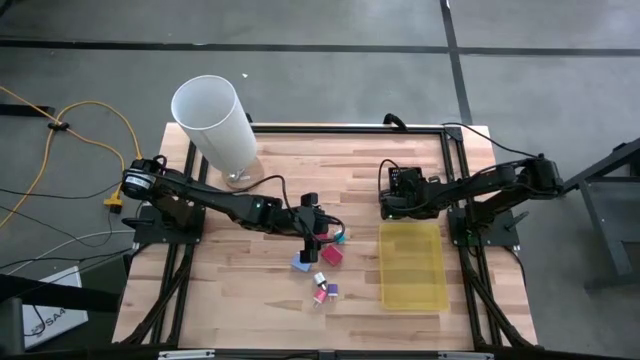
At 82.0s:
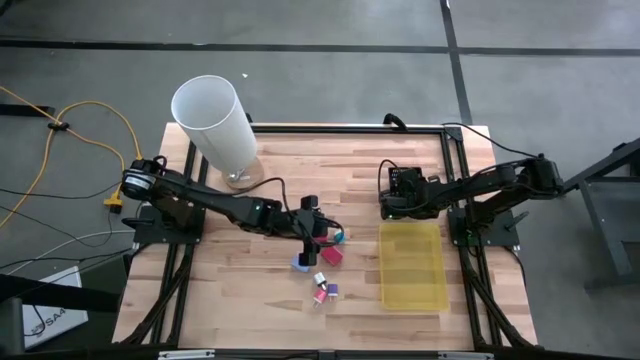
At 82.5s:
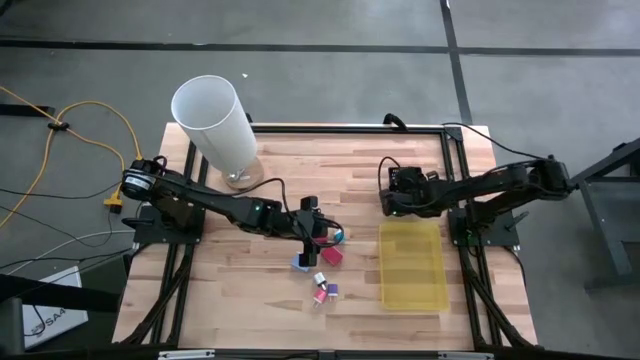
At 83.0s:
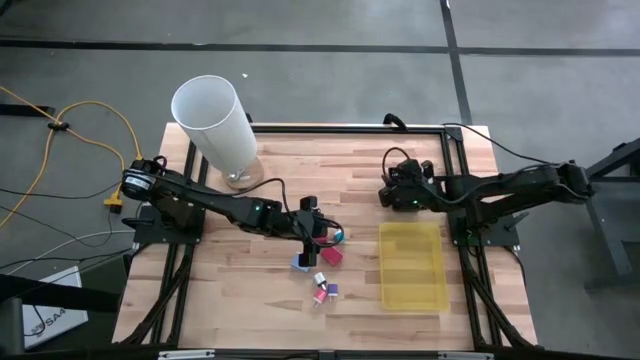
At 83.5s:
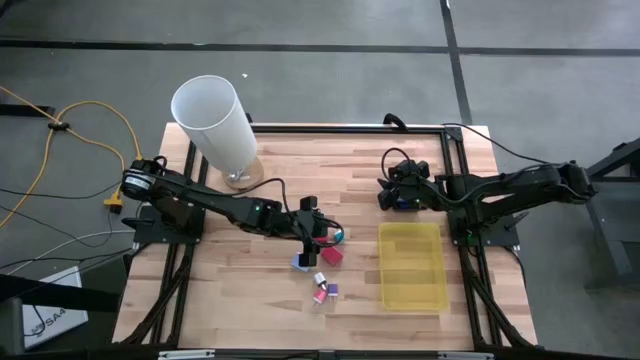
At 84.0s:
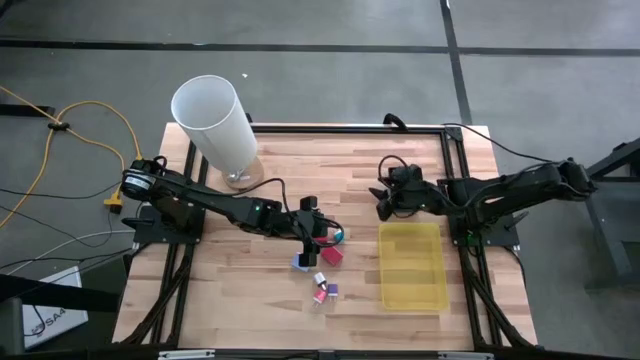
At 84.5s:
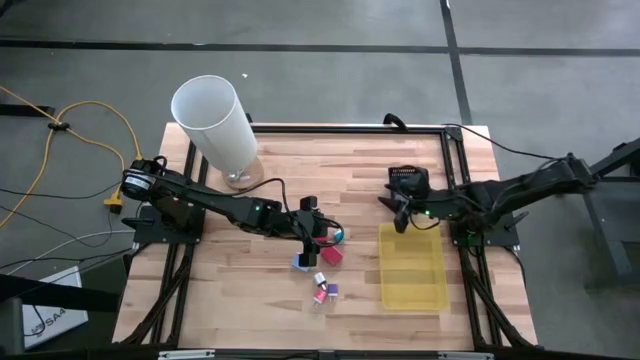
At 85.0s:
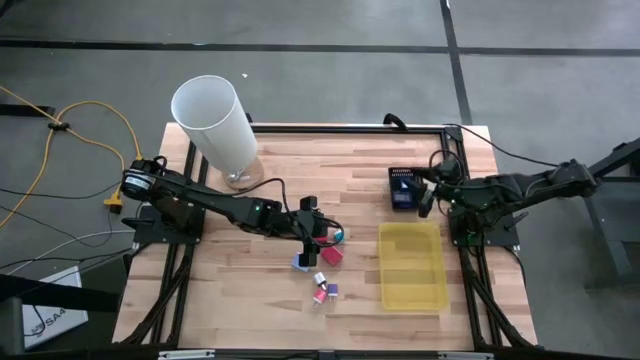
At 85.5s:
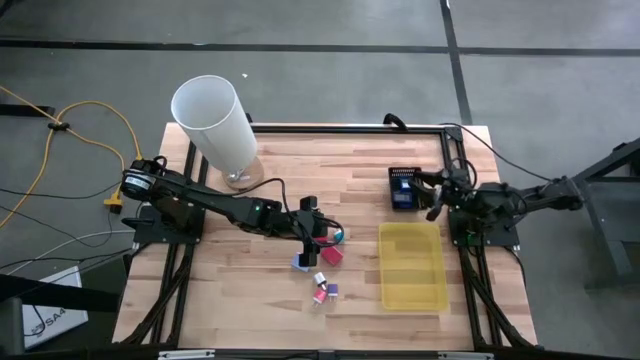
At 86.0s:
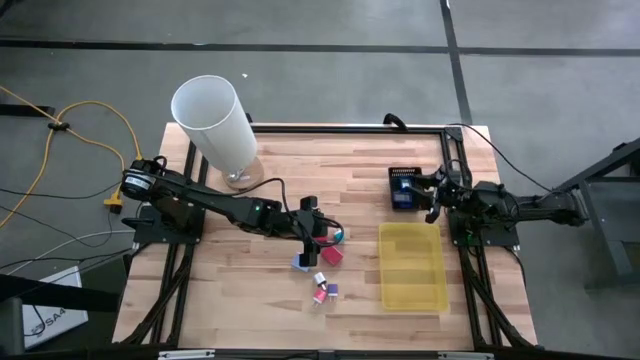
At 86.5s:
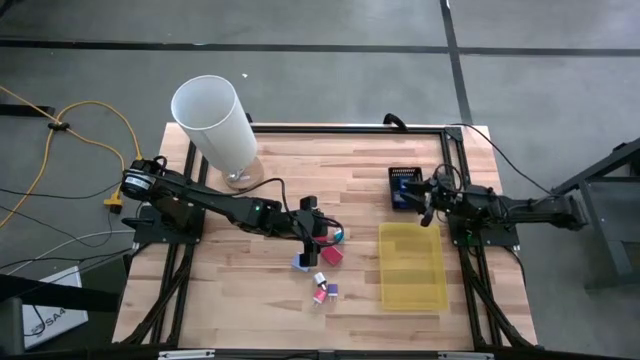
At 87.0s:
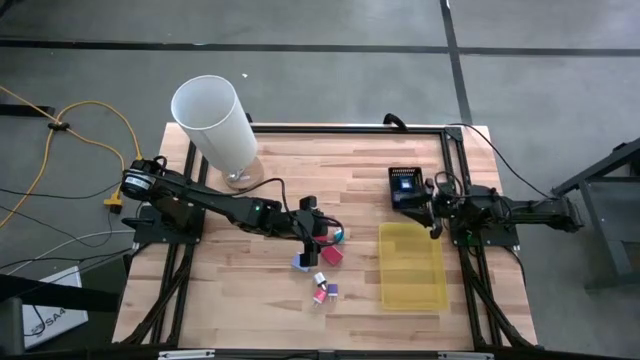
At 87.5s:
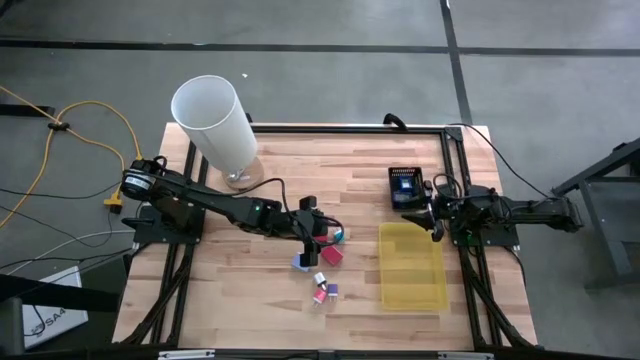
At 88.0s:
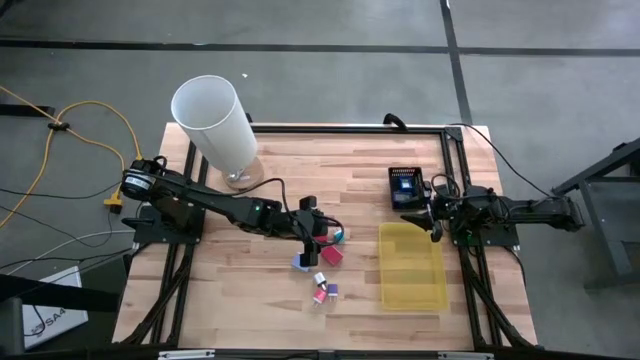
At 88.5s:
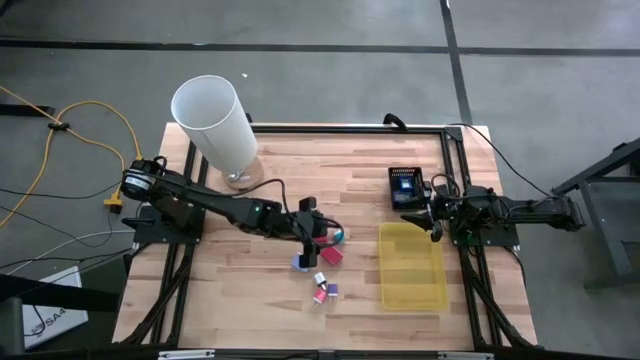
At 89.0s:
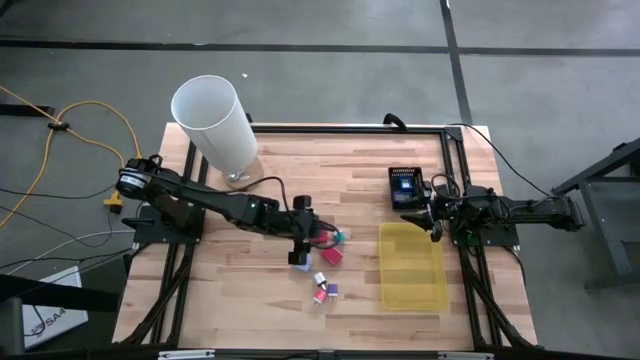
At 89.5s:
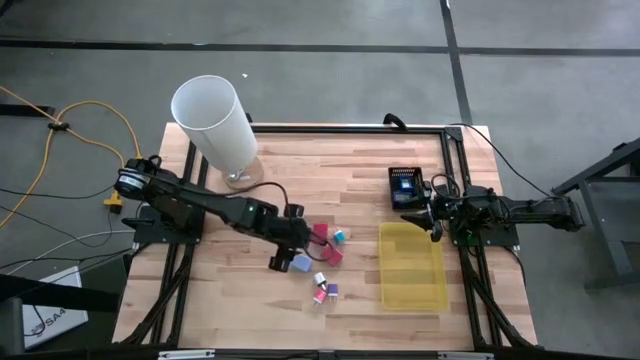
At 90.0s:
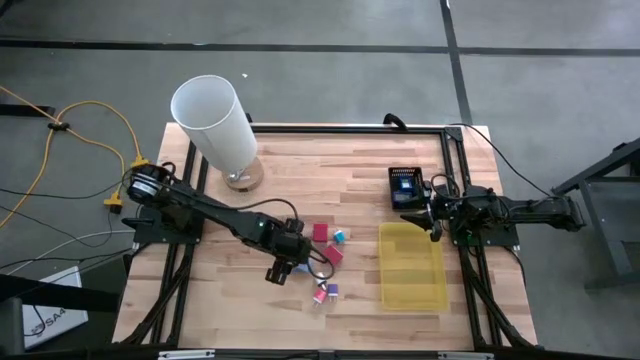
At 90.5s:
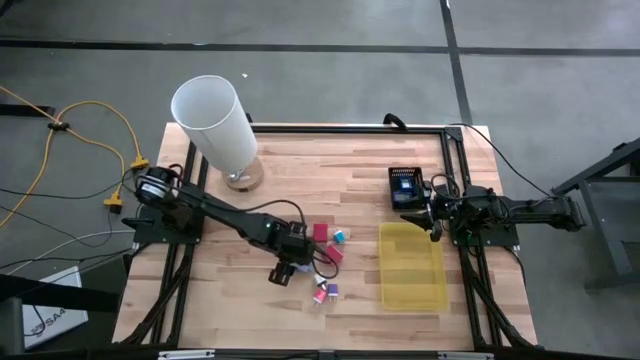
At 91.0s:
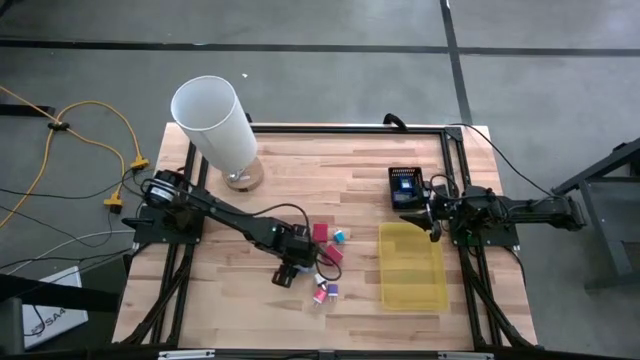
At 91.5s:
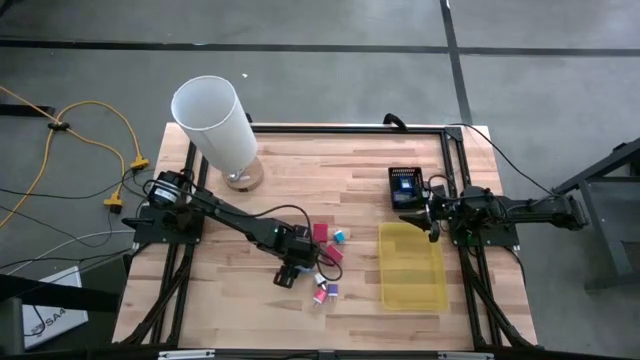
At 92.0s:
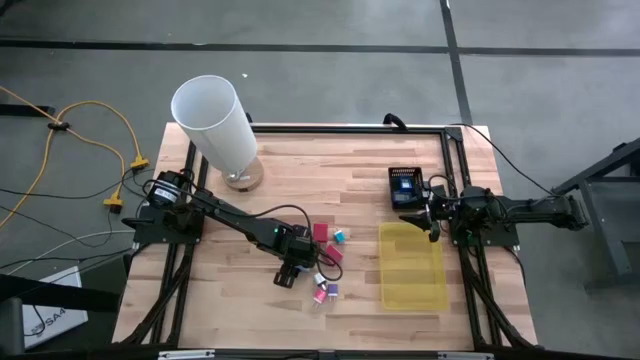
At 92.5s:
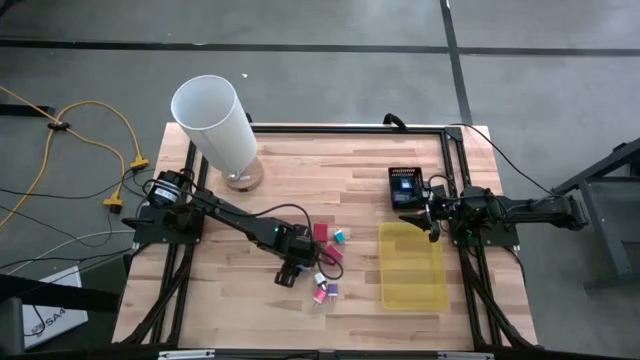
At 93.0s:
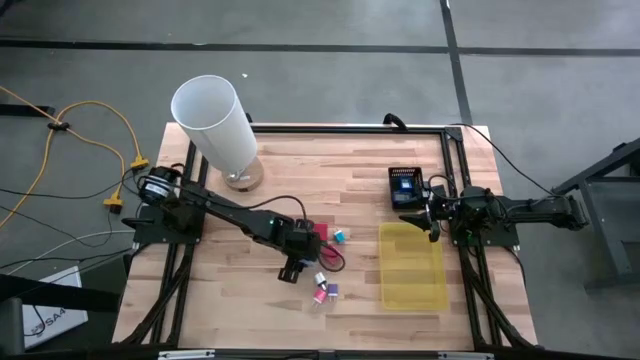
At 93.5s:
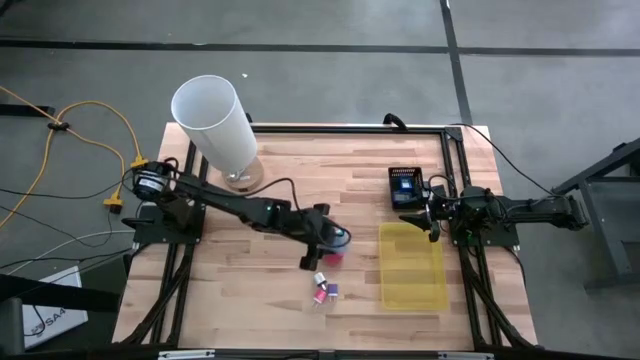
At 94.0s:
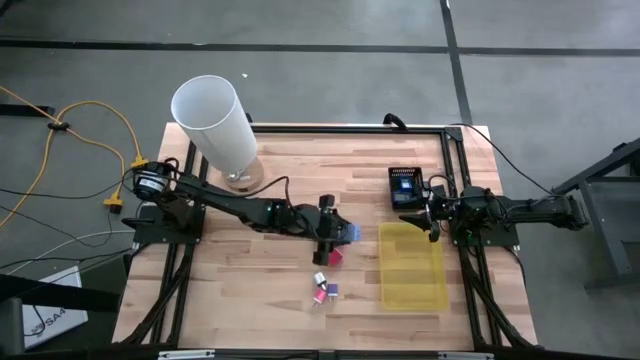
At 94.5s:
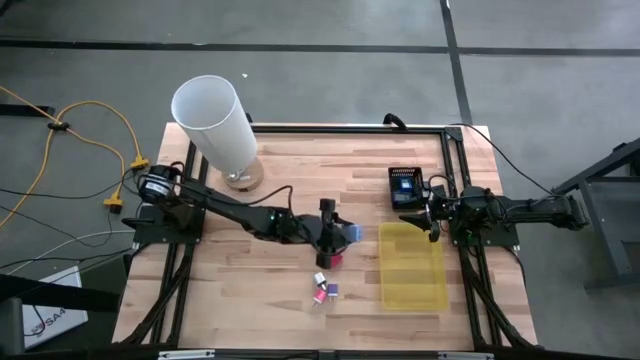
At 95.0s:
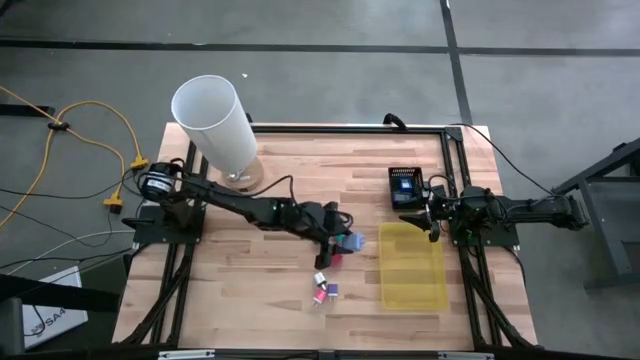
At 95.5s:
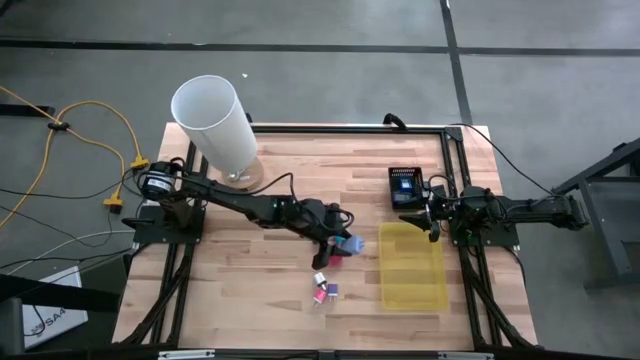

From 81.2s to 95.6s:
Task: Pick & Place Office items
Put the blue charger adapter into the yellow bin

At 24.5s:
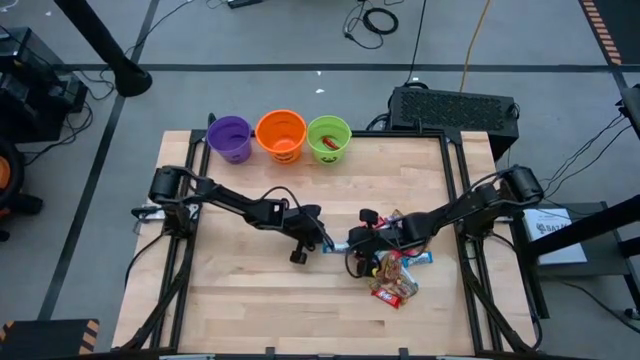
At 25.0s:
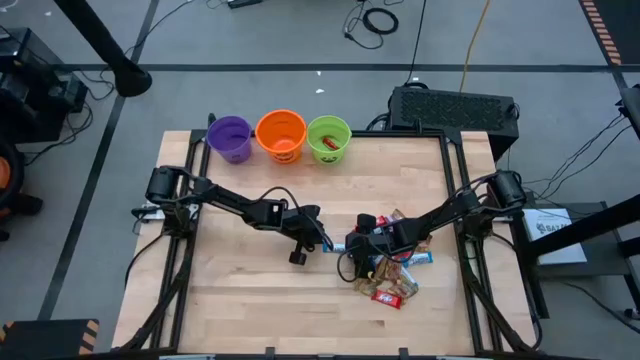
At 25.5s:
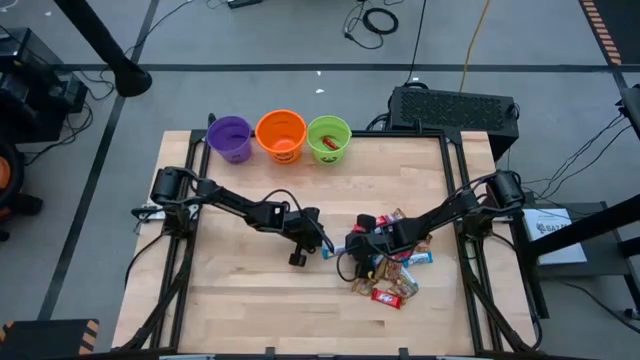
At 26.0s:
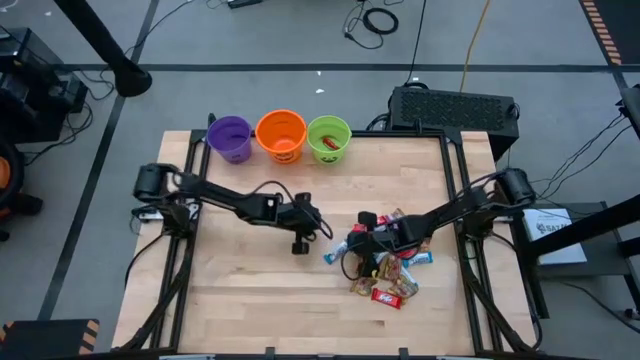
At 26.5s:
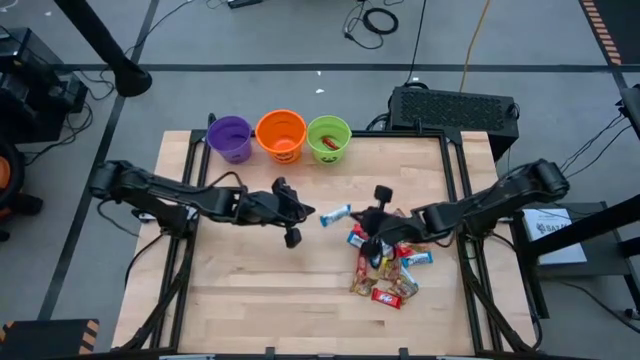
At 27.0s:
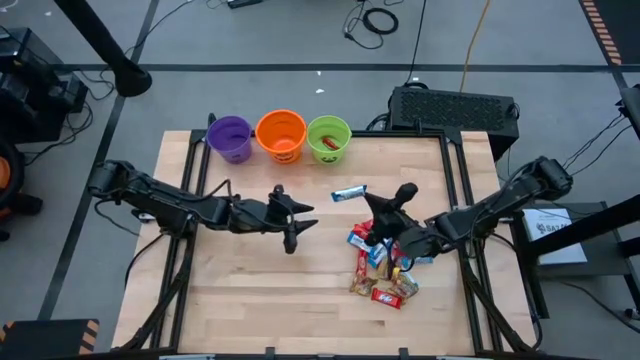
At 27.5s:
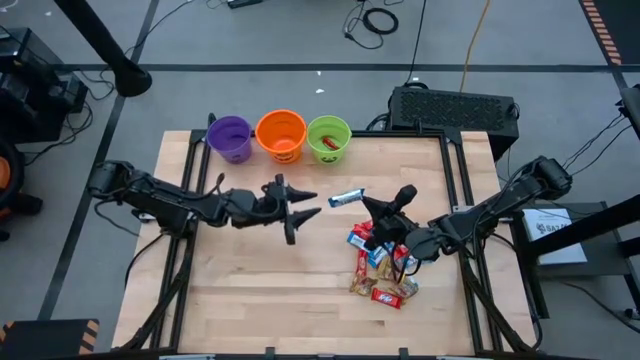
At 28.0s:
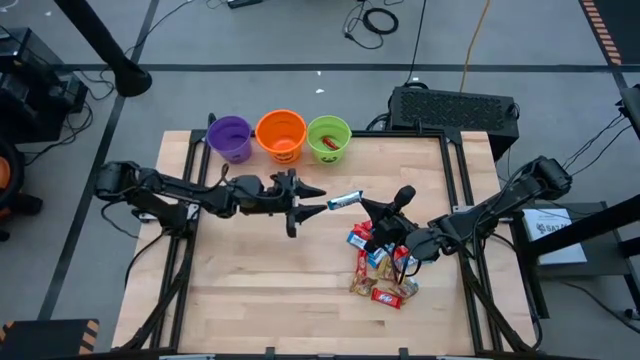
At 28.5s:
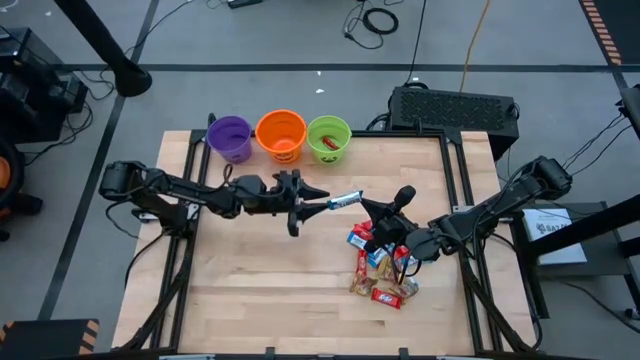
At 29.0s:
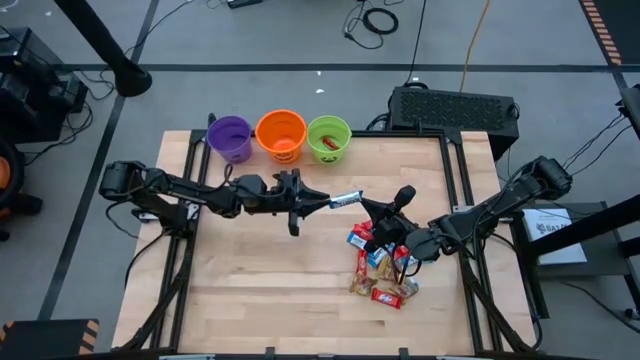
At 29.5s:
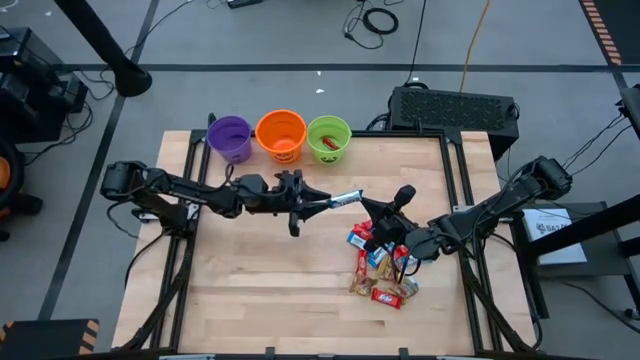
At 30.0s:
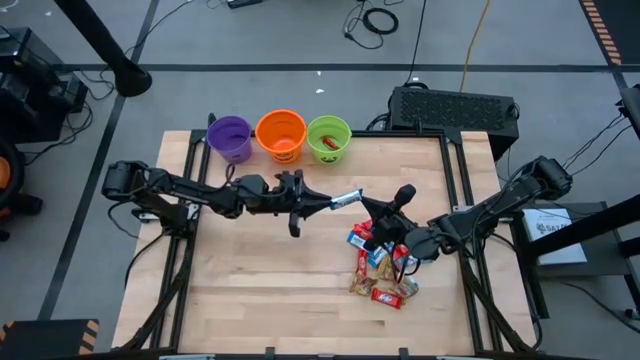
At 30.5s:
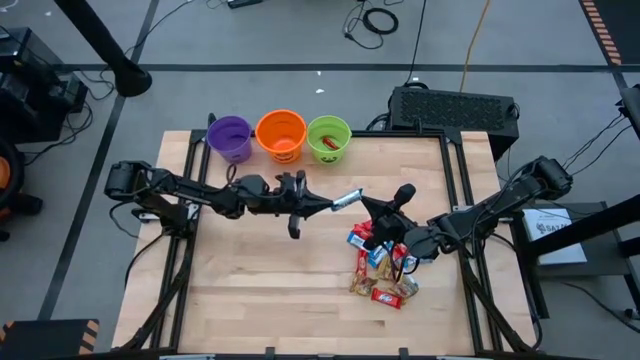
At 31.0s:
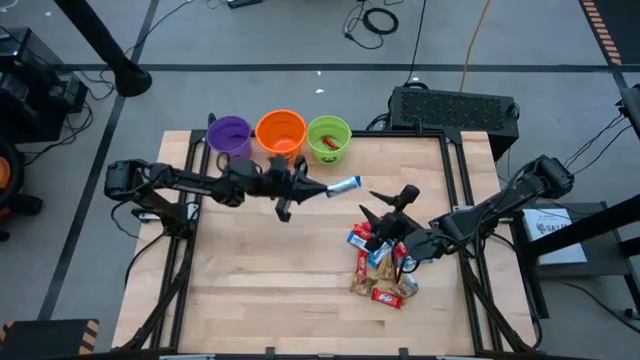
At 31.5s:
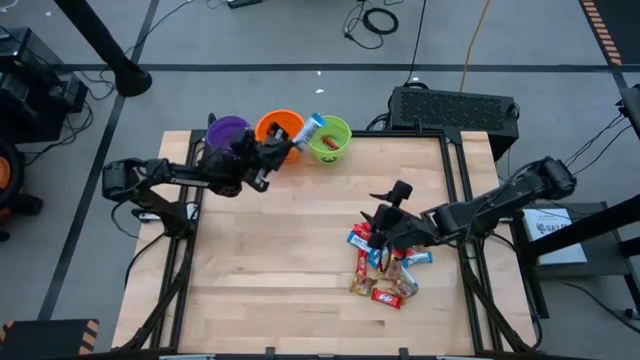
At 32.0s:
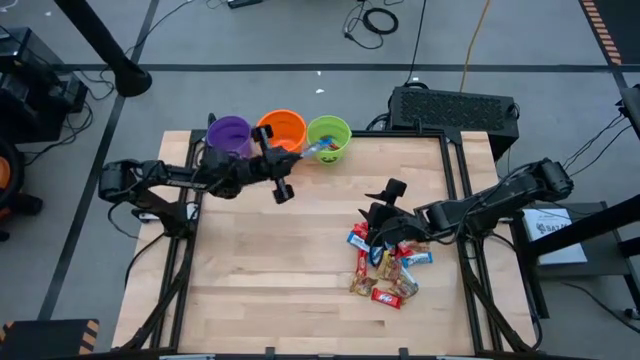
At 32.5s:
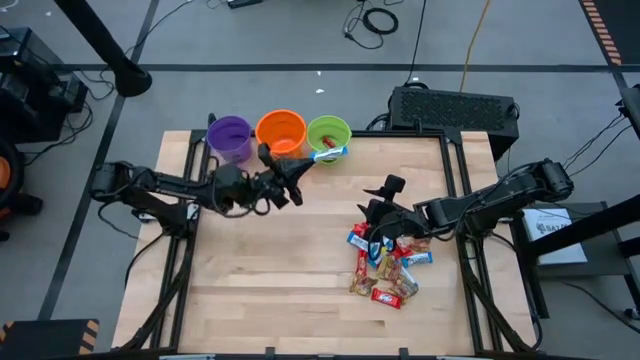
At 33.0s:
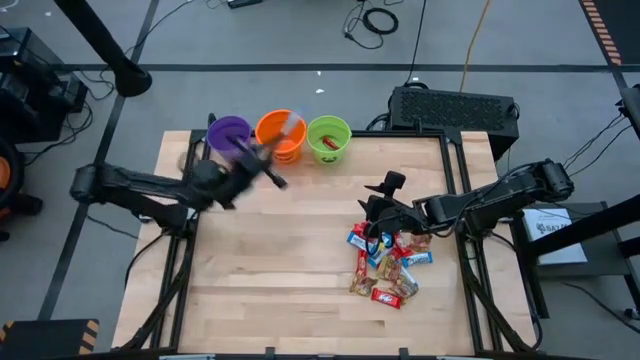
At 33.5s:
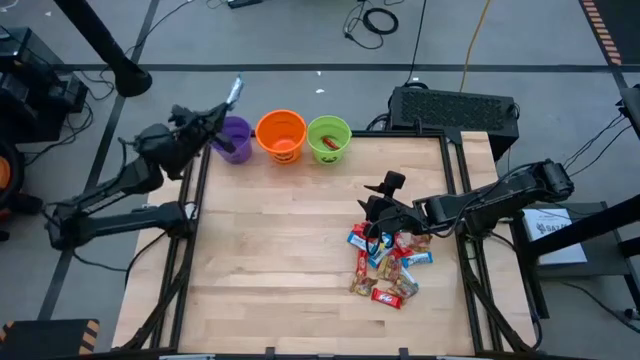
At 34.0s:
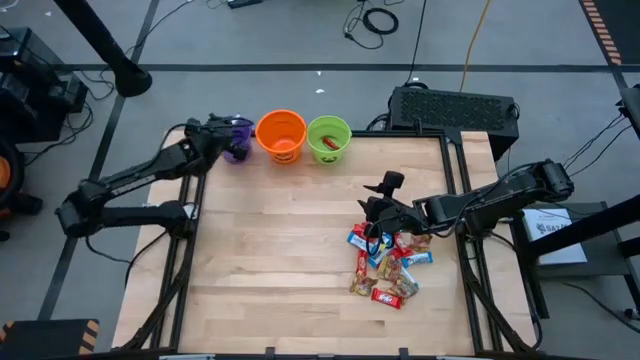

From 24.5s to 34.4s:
Task: Sort candy by brand, put in halloween buckets
Put the white chocolate bar into the violet bucket
